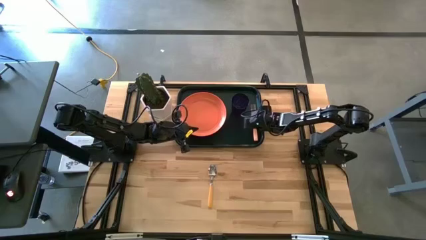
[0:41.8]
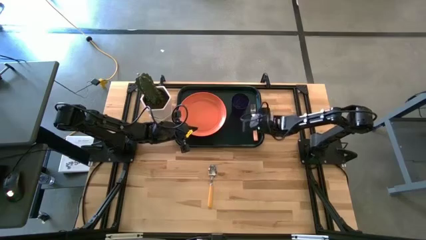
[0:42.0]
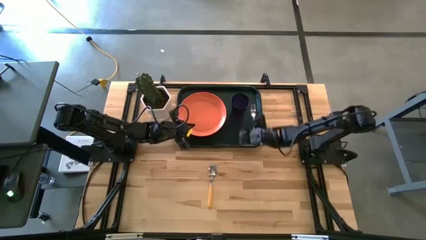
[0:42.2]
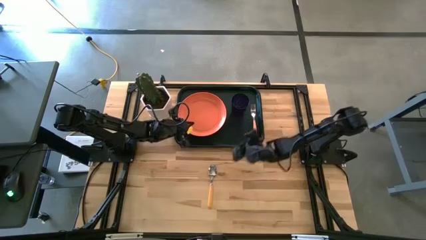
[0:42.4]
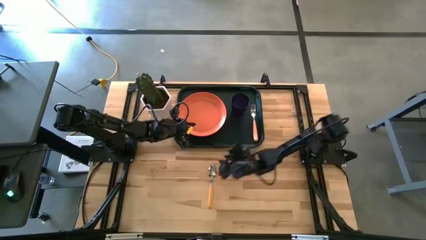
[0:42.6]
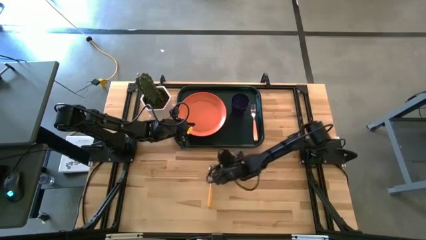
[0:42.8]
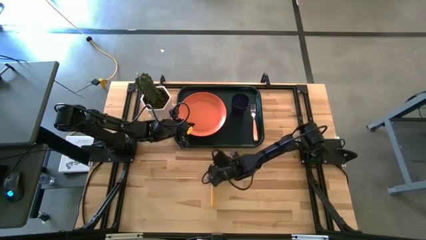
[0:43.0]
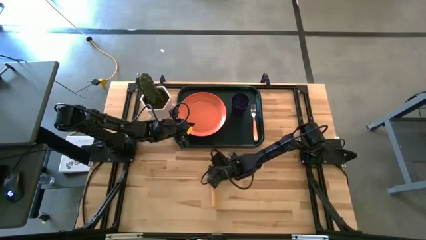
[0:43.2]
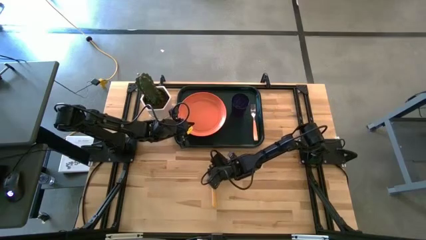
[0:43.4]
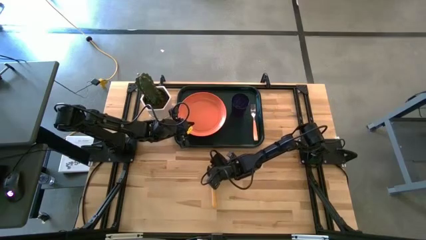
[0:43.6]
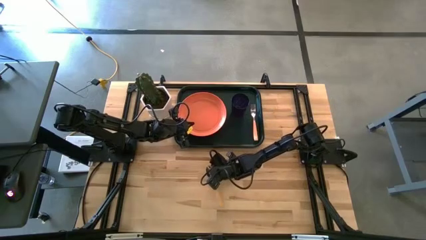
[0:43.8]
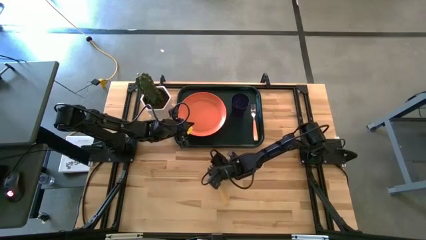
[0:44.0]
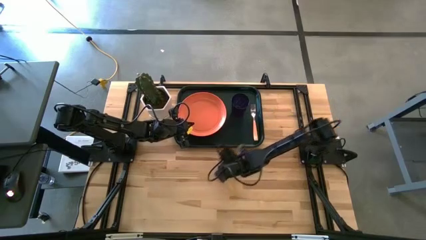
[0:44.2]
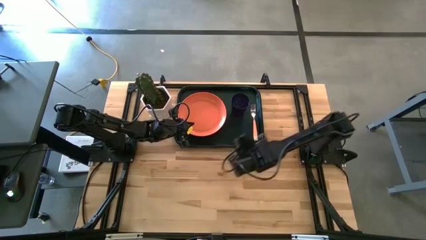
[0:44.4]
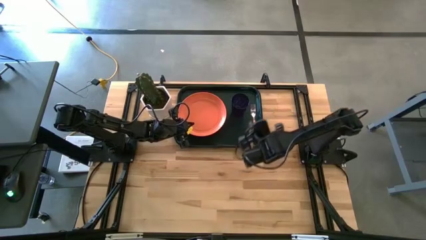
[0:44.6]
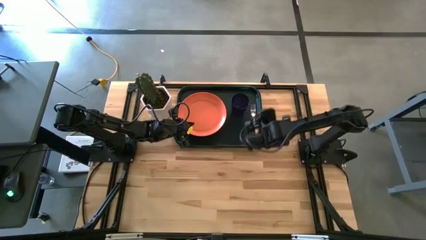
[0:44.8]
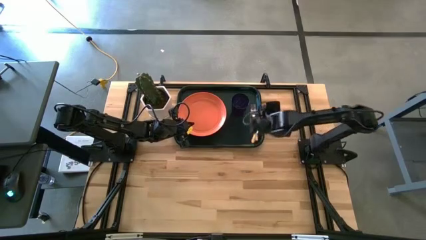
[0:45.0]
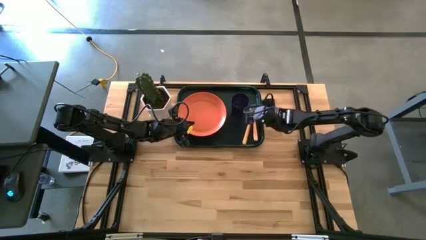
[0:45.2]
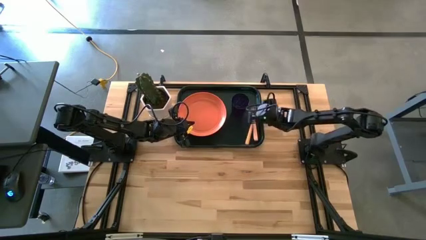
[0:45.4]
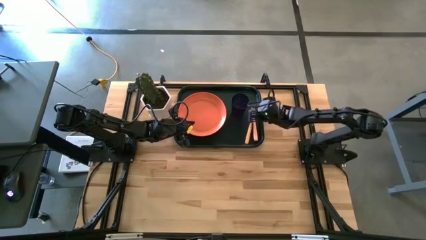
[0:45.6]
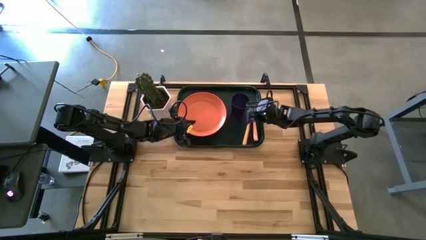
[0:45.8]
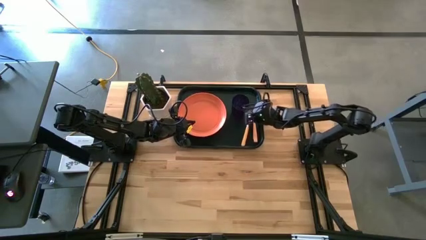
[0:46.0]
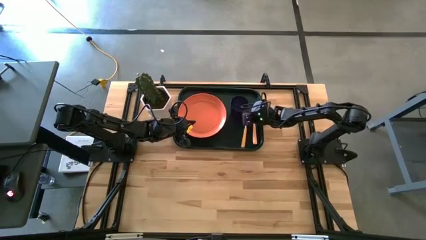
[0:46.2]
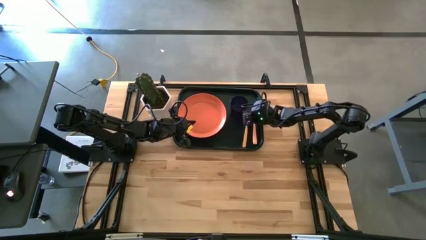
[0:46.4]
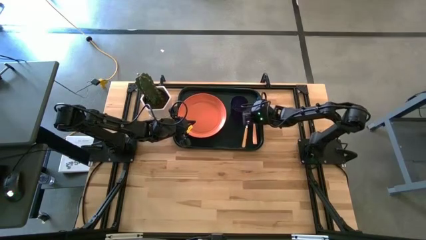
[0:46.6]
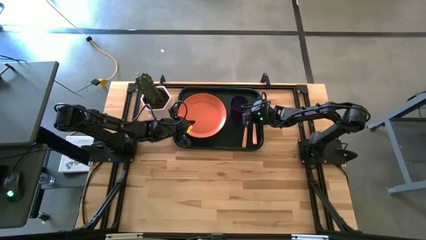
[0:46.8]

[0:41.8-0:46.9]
Task: Pick and place plate/cup/fork/spoon on tray
Put the orange spoon to the right of the violet cup on the dark green tray

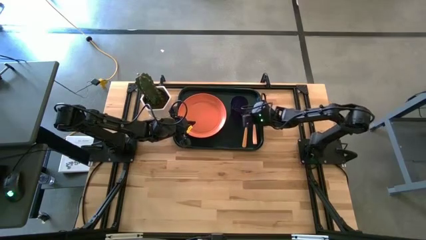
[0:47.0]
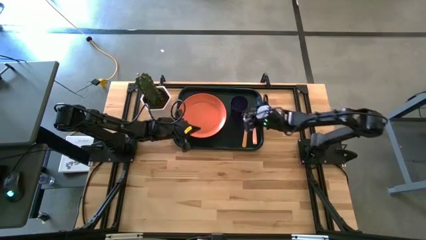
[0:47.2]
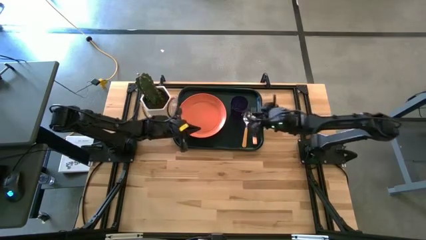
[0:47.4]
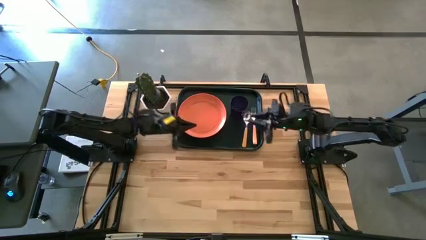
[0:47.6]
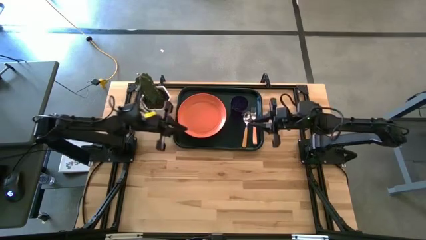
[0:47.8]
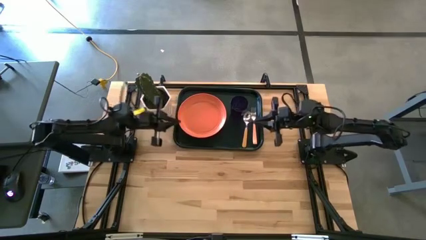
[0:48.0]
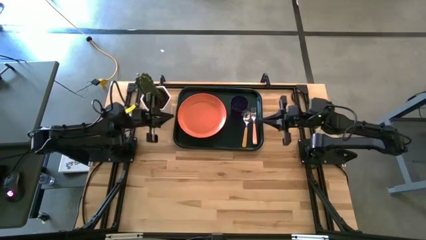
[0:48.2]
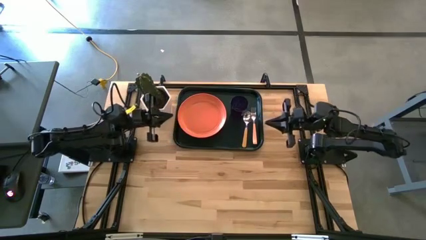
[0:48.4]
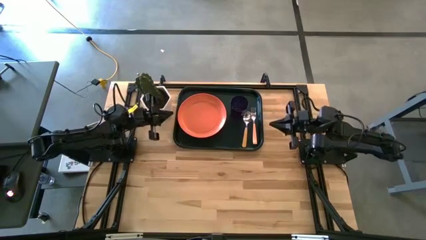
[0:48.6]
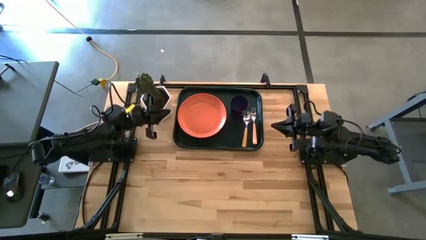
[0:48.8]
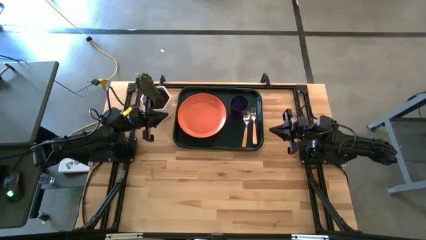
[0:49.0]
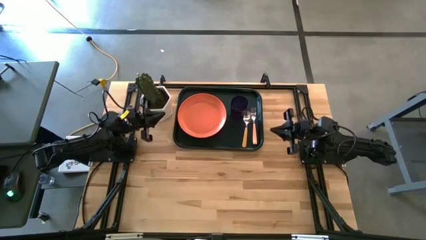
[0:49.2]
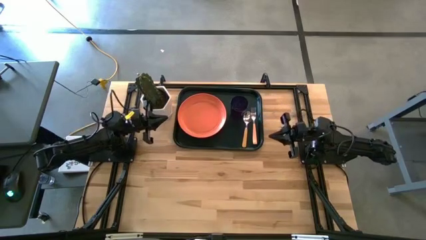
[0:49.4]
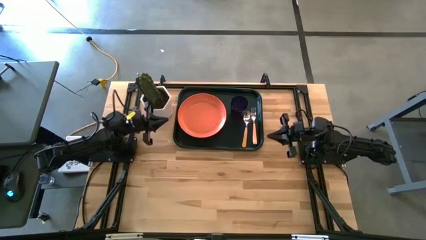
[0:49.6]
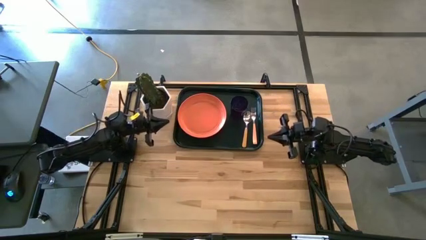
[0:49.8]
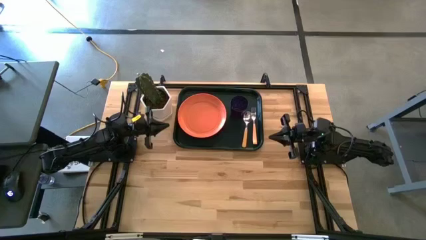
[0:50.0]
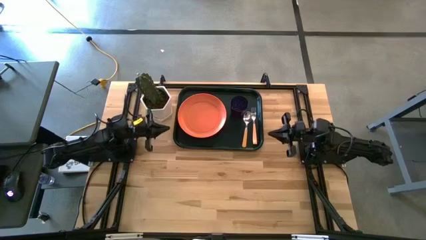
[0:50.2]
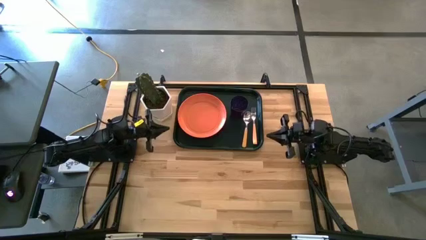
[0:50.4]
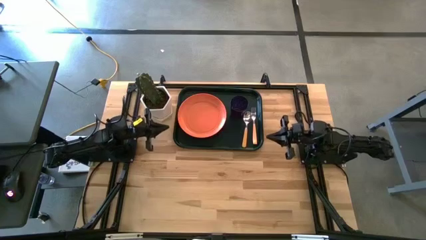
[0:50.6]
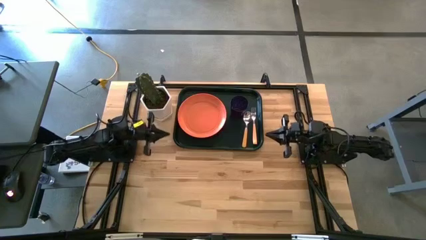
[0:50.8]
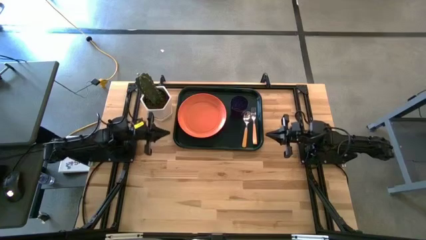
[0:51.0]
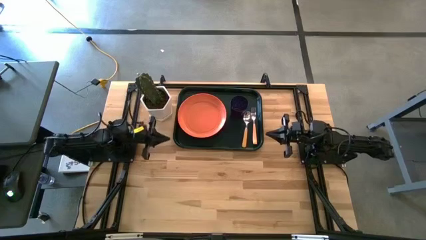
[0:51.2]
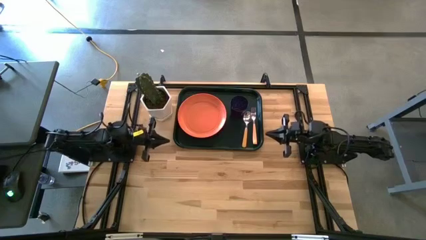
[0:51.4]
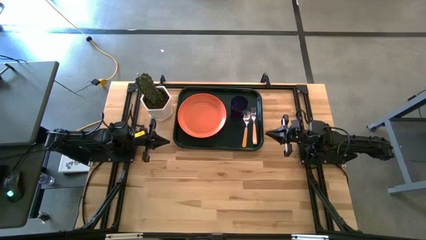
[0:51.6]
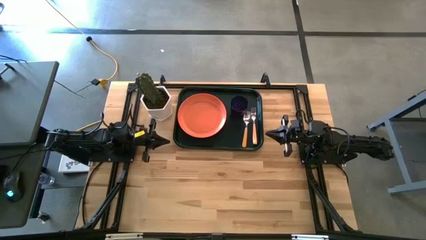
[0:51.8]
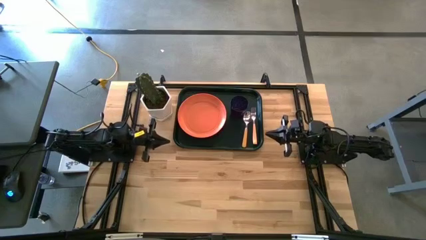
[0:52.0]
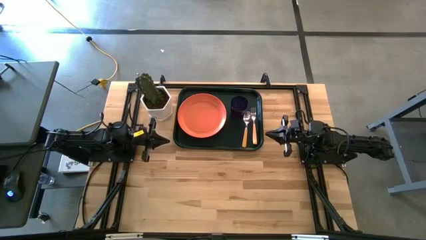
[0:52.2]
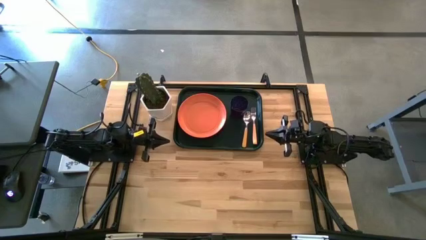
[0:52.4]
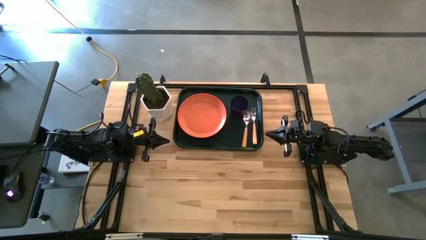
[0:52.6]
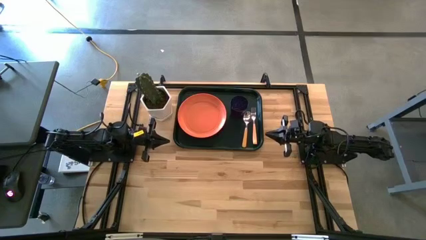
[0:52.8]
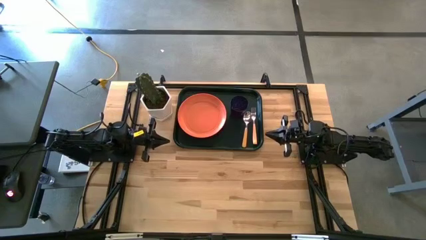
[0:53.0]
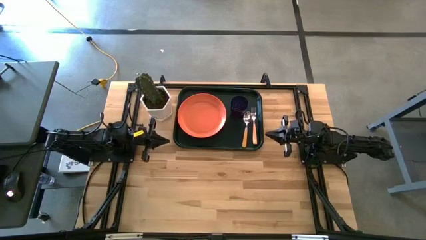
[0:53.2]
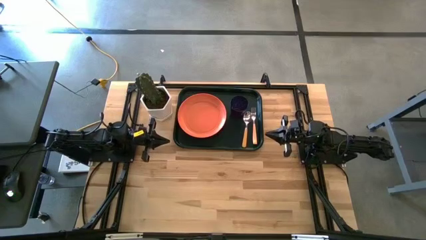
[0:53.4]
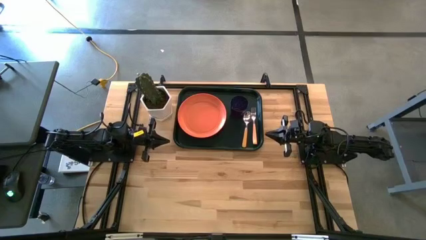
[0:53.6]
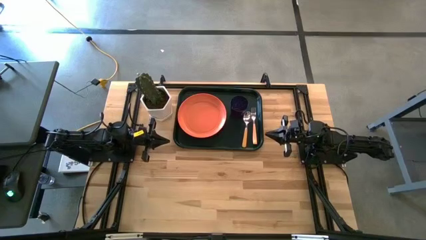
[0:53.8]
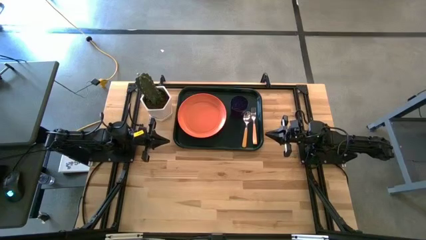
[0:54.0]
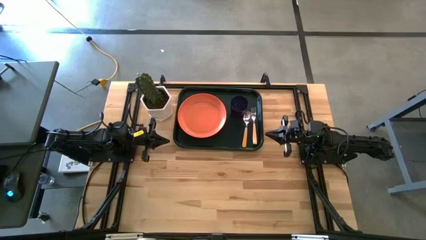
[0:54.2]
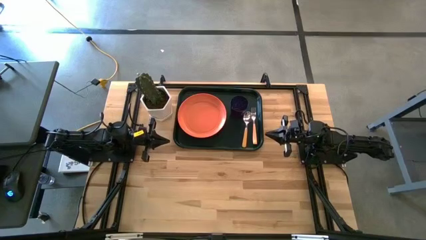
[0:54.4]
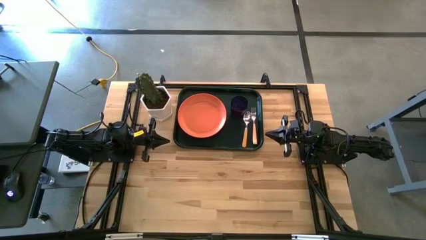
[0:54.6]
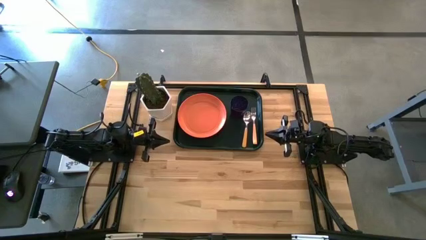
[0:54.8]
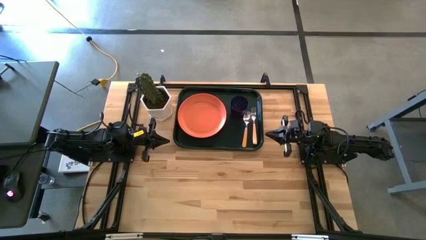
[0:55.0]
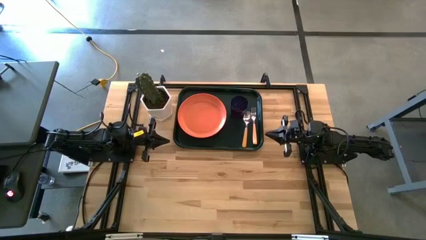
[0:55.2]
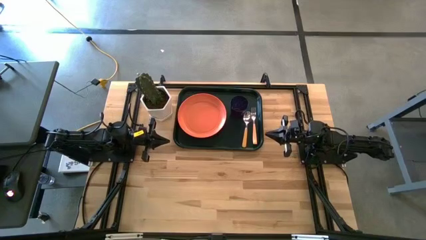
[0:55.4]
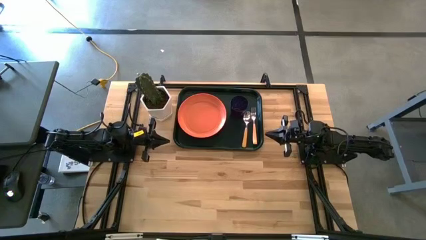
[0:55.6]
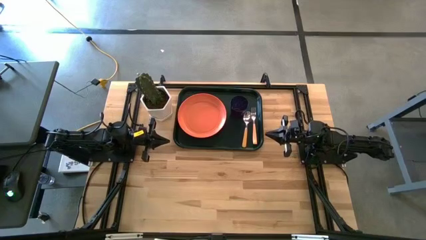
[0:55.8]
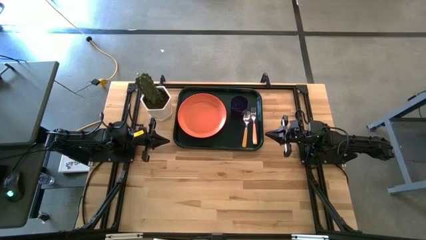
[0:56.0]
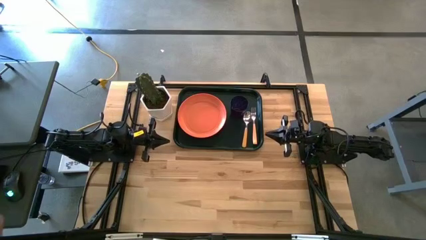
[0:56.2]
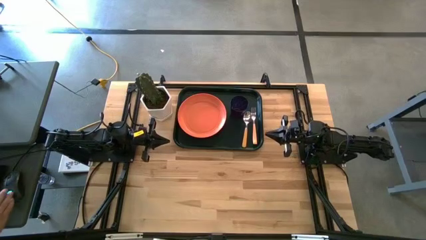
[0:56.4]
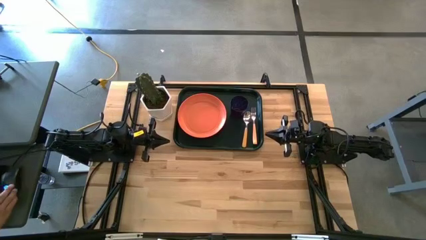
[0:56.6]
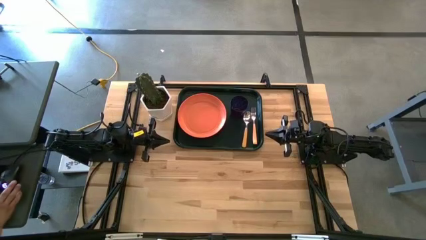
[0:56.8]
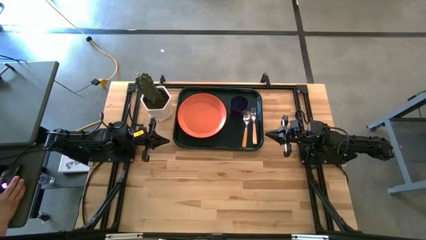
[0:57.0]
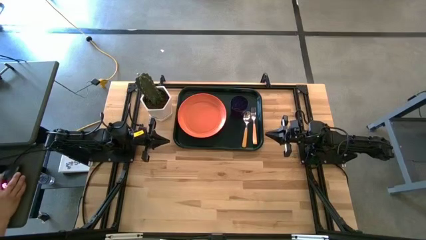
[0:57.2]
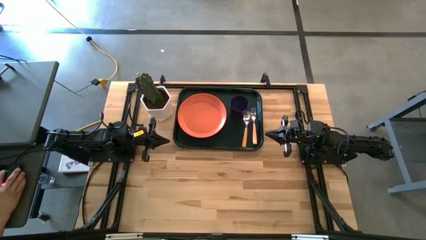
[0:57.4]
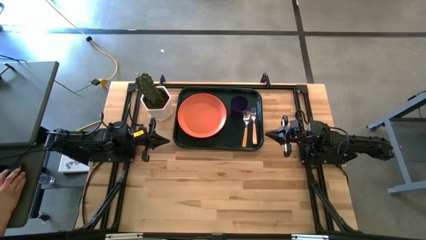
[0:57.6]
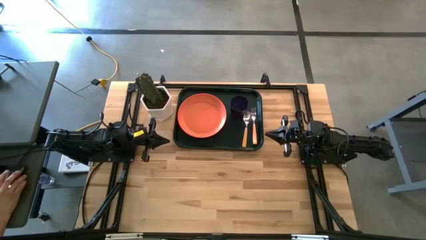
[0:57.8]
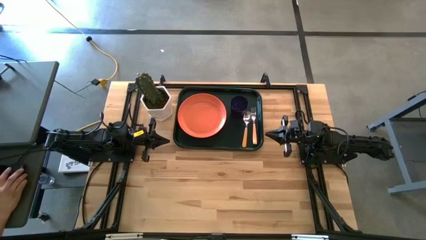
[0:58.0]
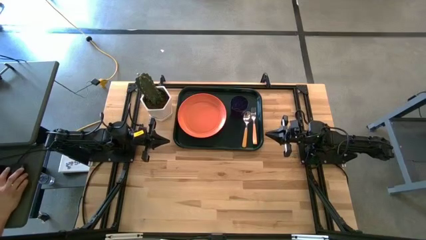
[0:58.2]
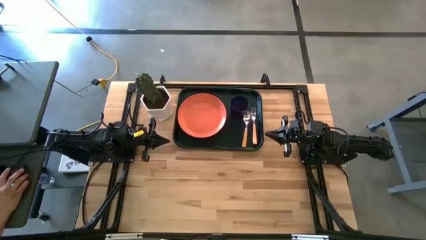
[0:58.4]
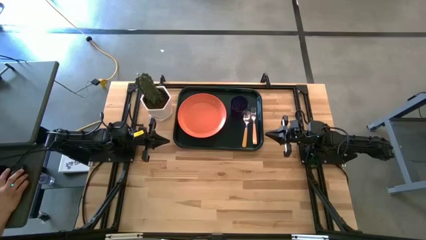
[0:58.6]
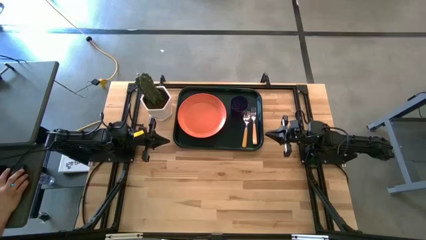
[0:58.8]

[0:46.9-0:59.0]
Return to Home Position
